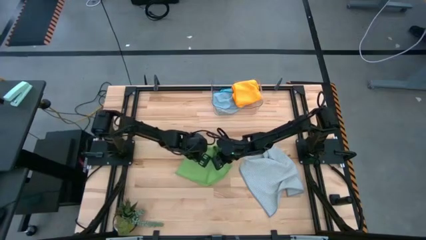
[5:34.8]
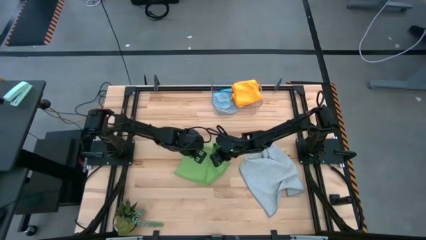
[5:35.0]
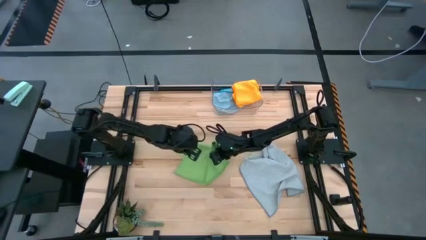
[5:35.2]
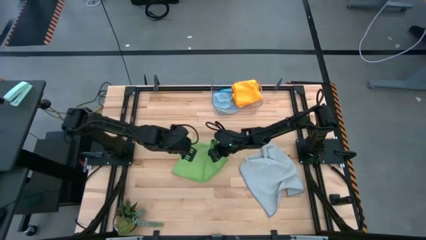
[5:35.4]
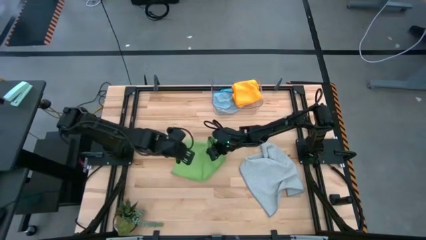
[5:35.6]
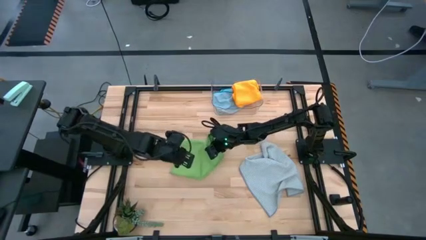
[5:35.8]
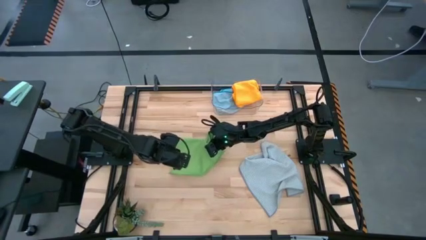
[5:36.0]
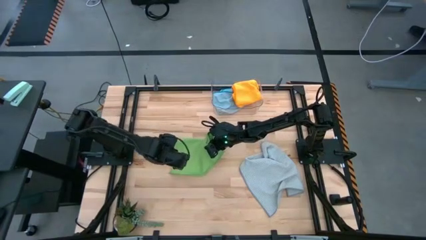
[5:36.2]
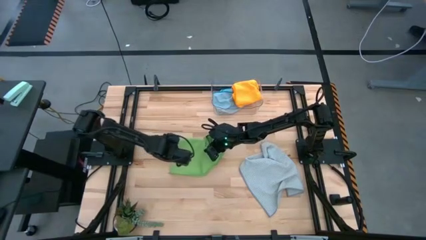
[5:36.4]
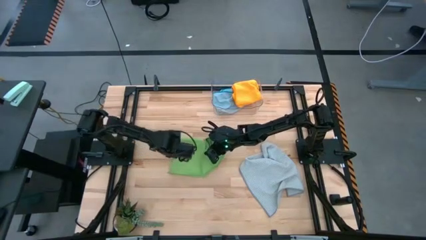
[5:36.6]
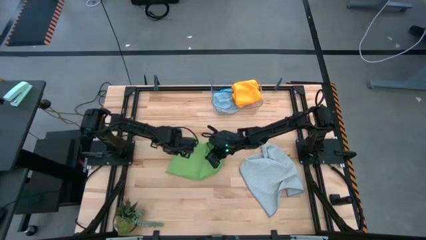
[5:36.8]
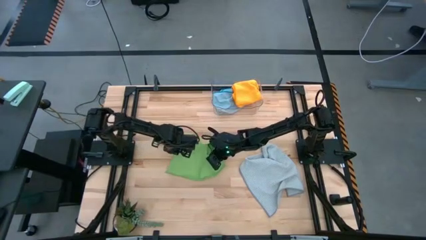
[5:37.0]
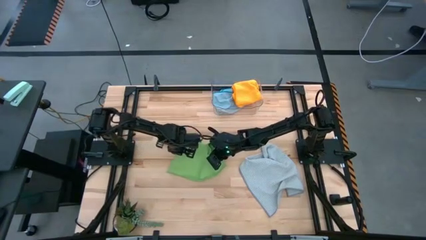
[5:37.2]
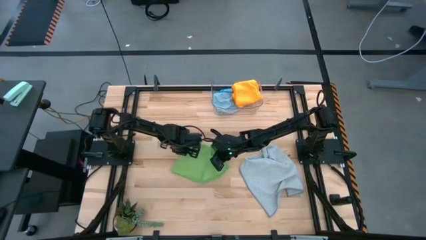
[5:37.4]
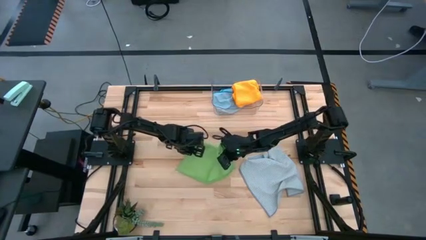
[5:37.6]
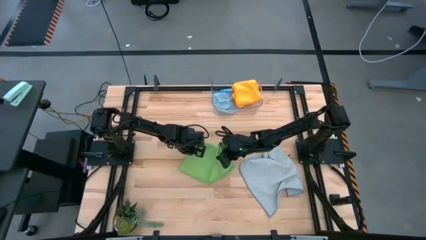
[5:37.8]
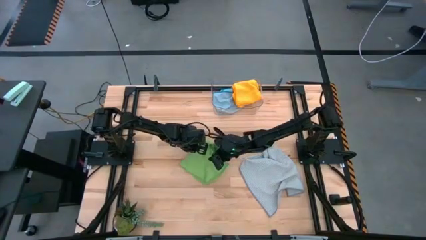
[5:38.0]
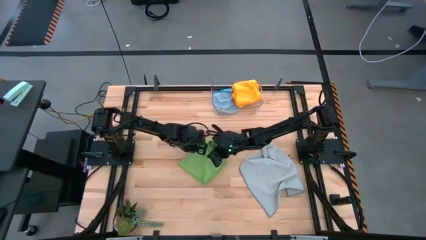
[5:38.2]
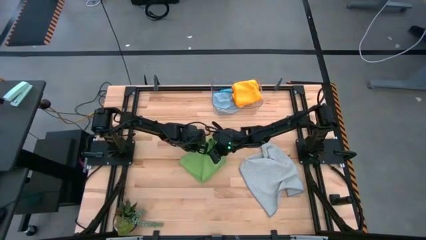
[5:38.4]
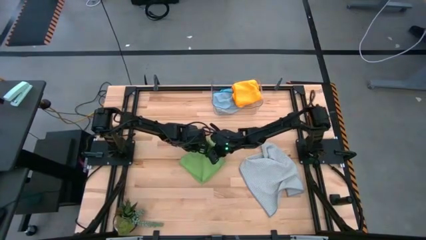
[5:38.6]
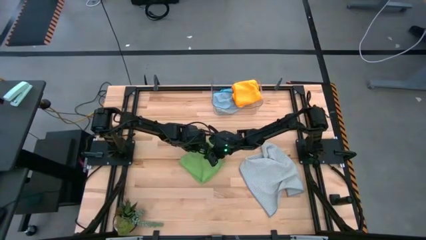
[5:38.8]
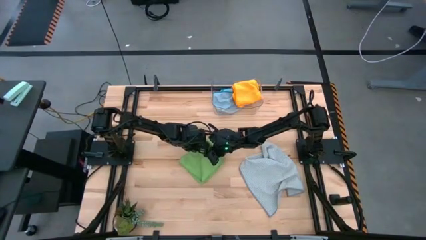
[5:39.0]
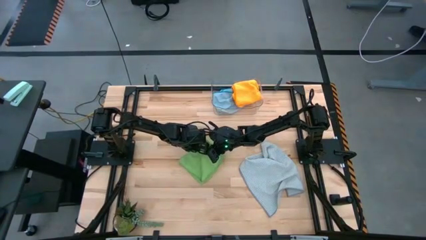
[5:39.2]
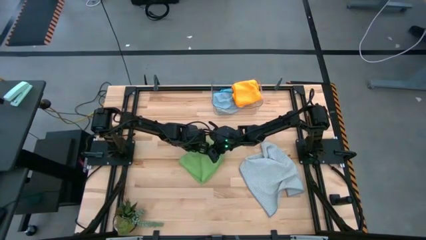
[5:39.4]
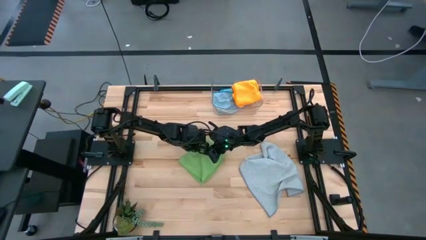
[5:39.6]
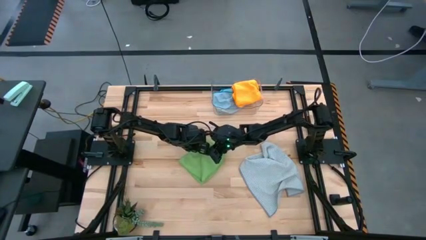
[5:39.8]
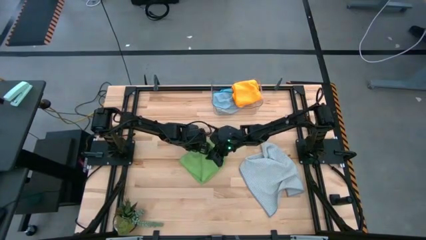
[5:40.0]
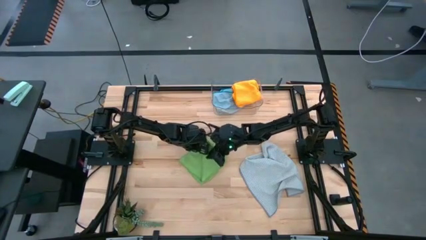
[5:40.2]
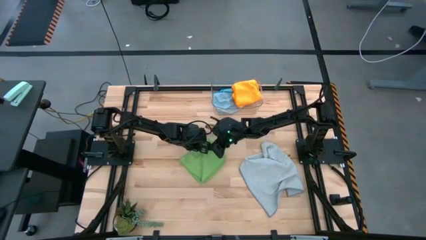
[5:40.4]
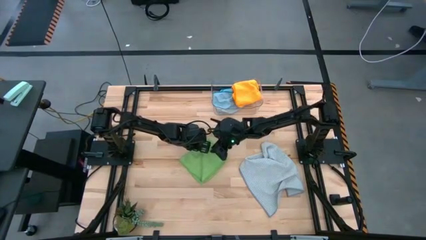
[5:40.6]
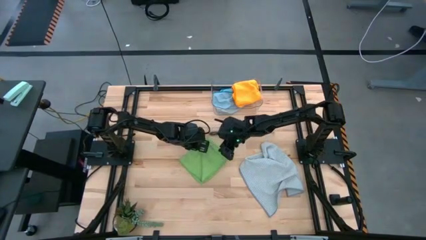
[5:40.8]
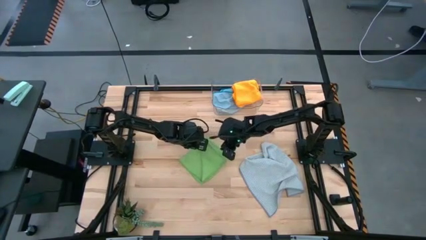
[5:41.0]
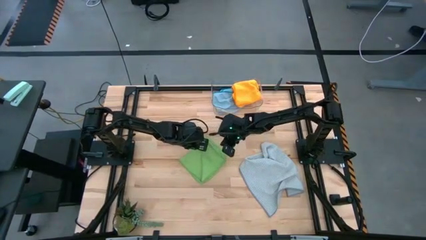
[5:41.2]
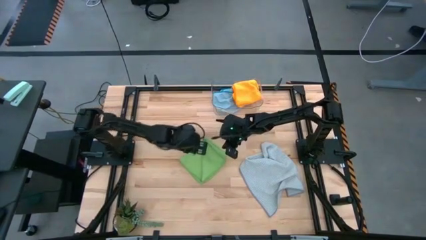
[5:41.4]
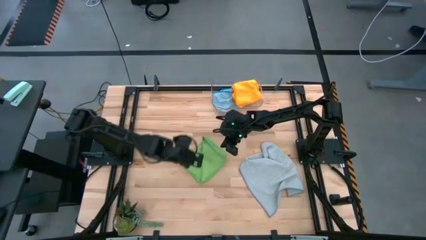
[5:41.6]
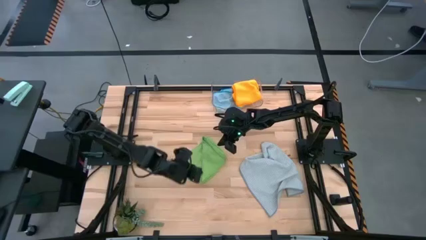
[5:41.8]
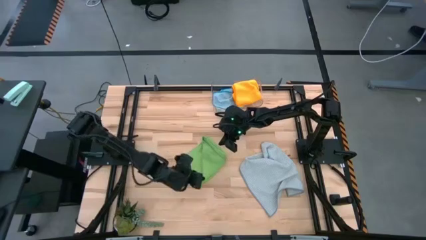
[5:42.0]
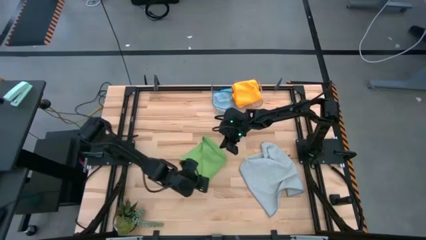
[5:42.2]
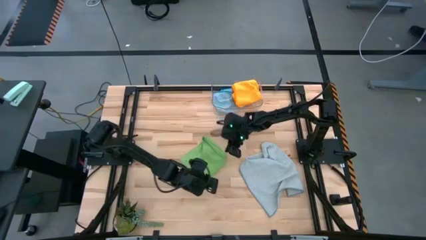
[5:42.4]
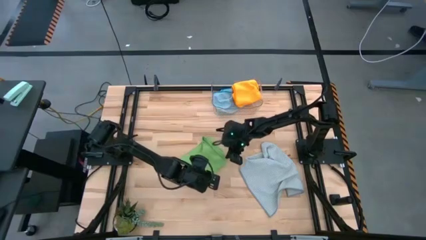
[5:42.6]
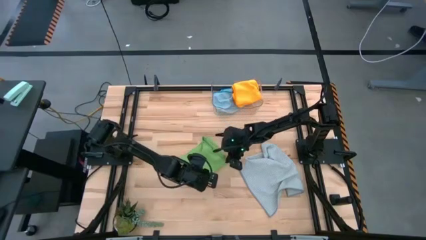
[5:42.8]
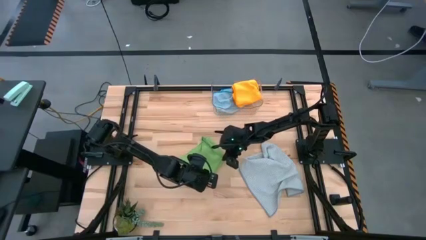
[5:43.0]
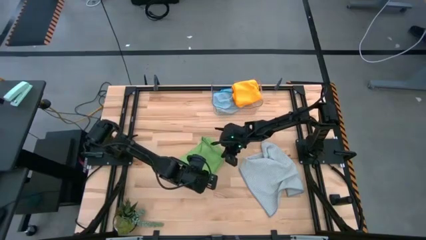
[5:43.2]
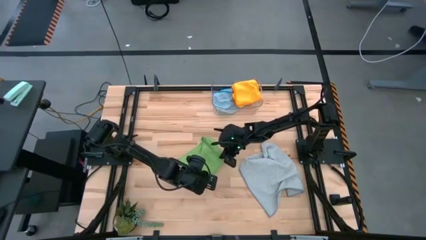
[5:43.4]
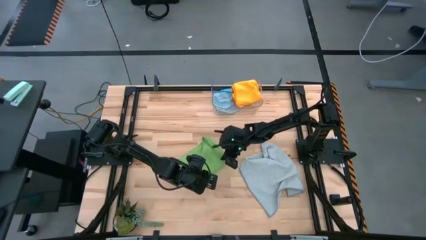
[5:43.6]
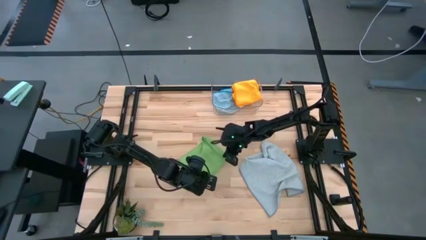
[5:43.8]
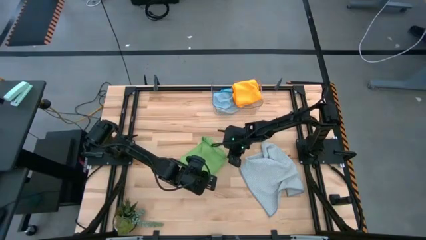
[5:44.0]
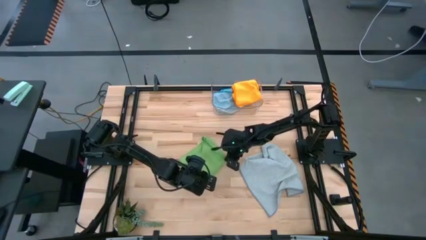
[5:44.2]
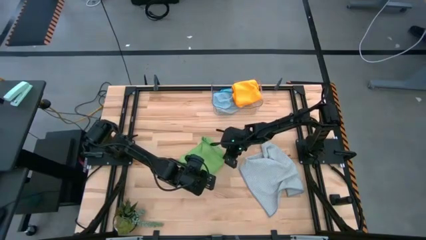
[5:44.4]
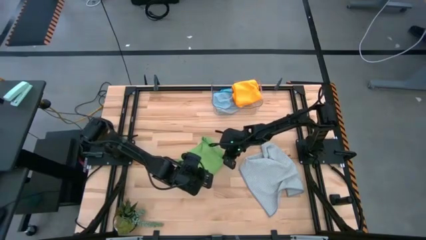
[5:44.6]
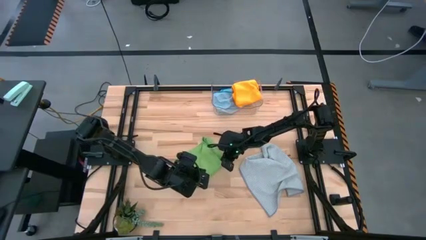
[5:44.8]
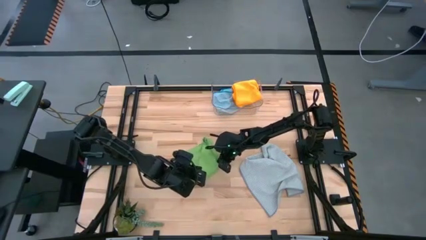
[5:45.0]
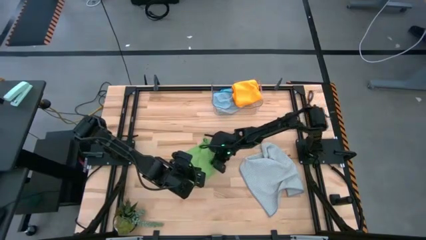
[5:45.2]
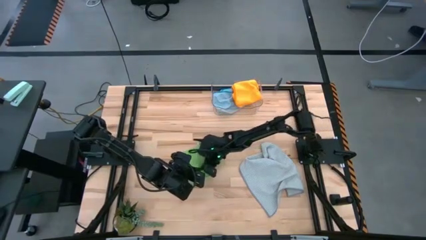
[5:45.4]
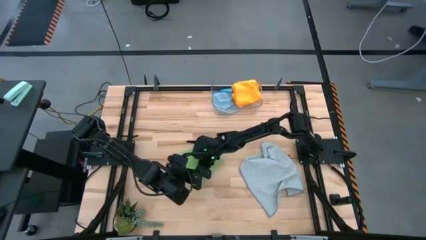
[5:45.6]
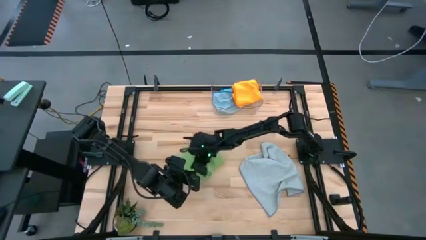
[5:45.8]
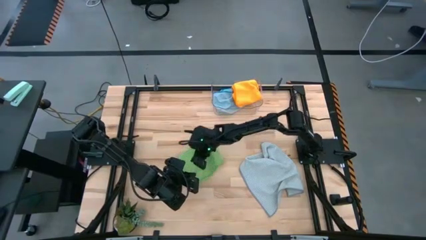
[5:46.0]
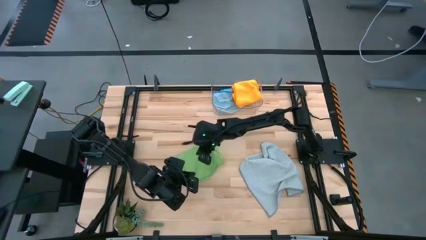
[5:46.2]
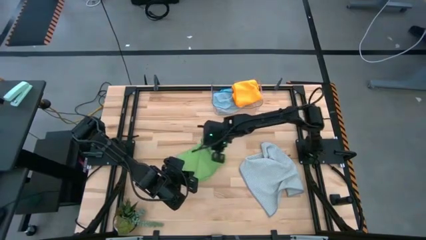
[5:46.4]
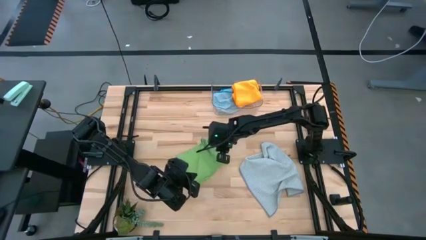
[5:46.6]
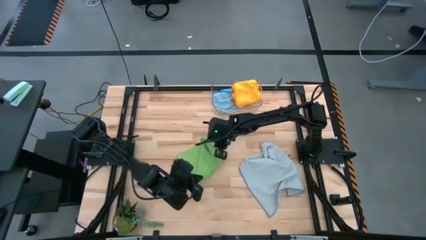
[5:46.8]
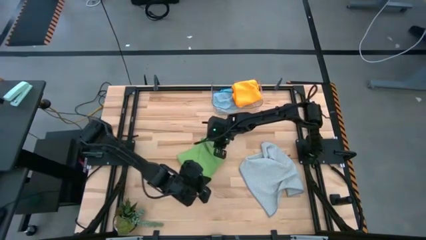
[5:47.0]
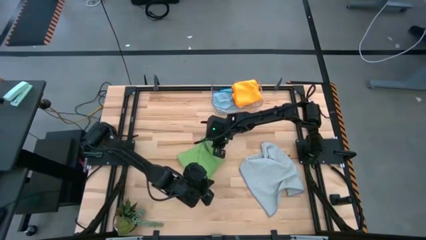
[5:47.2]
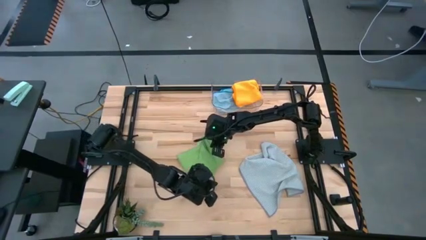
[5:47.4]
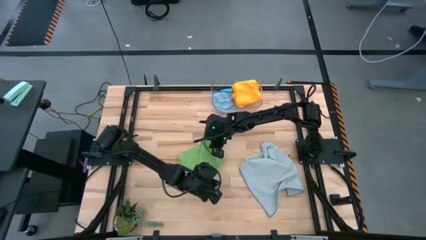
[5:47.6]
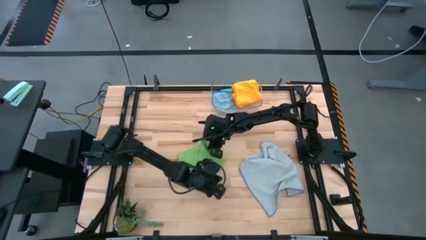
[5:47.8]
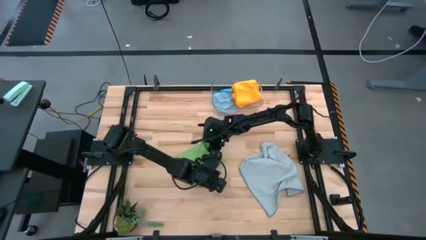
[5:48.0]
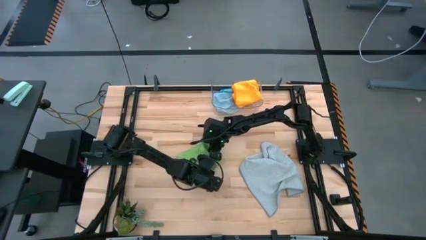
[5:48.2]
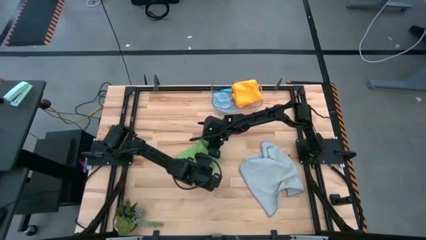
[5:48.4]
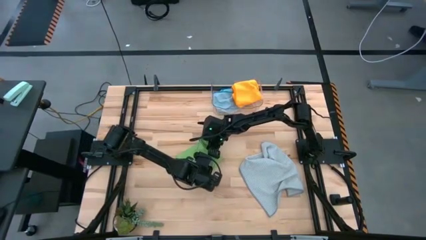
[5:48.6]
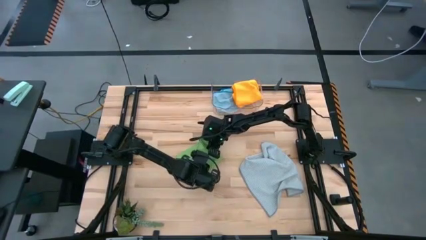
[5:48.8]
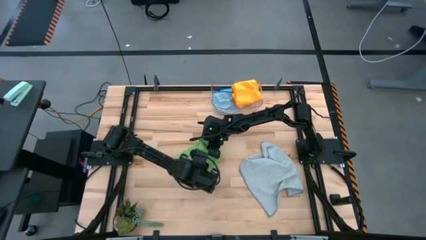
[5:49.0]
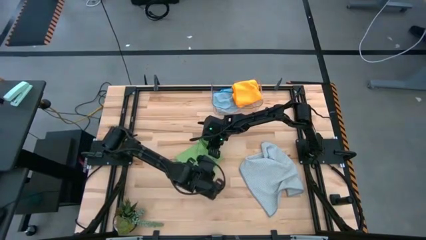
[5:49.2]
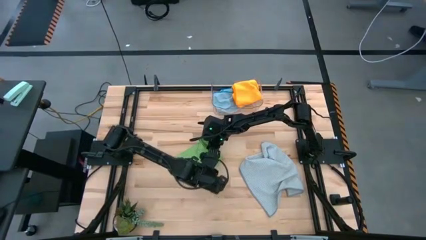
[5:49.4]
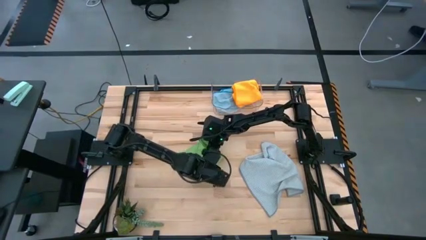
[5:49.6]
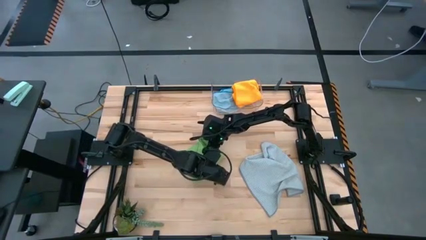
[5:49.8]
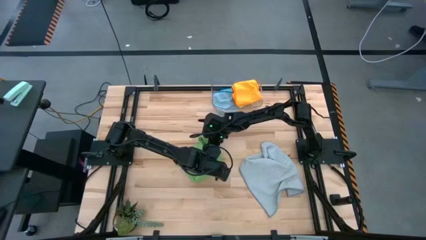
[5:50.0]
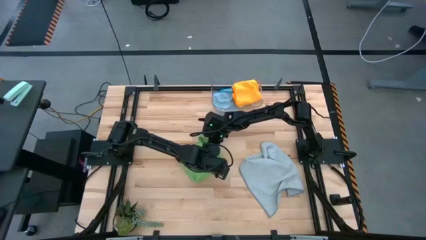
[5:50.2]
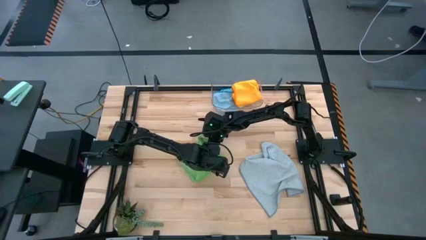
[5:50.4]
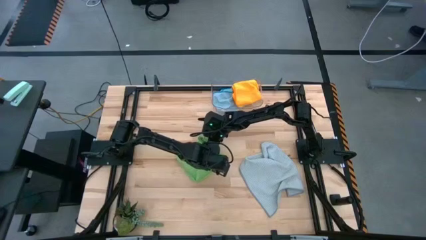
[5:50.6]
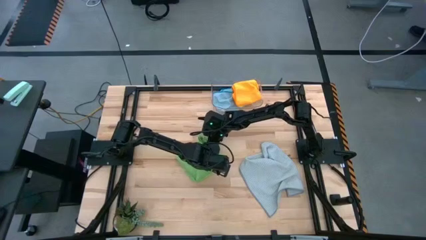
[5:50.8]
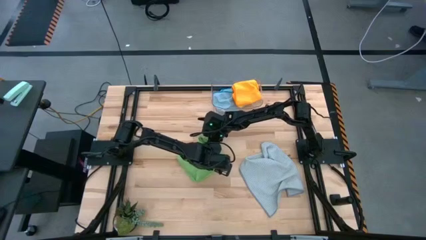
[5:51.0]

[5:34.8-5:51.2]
Task: Fold microfiber towels
Fold the green microfiber cloth
